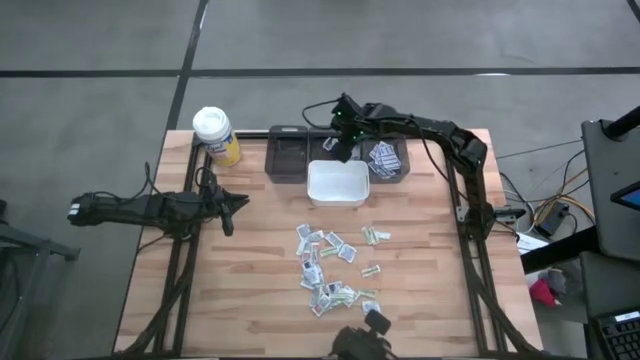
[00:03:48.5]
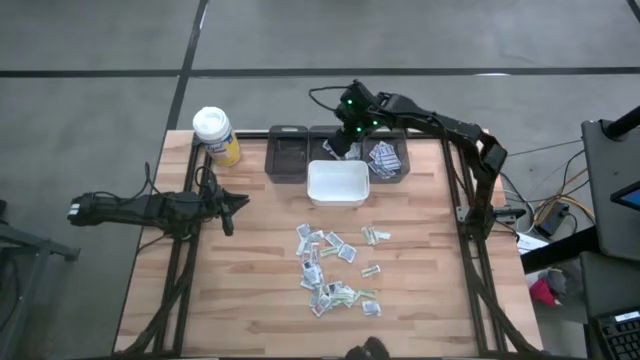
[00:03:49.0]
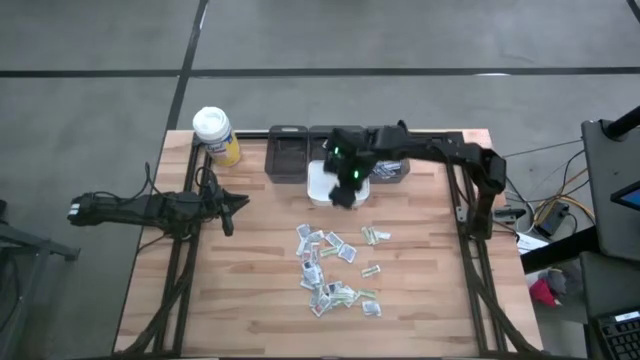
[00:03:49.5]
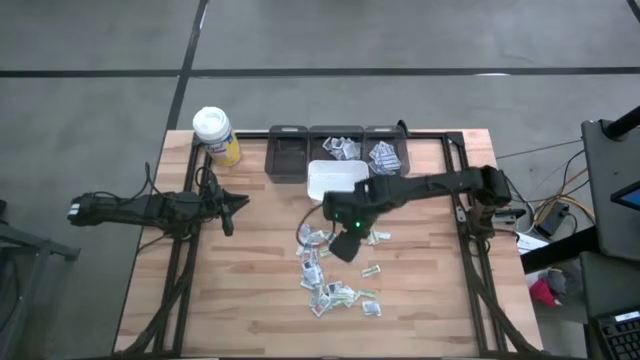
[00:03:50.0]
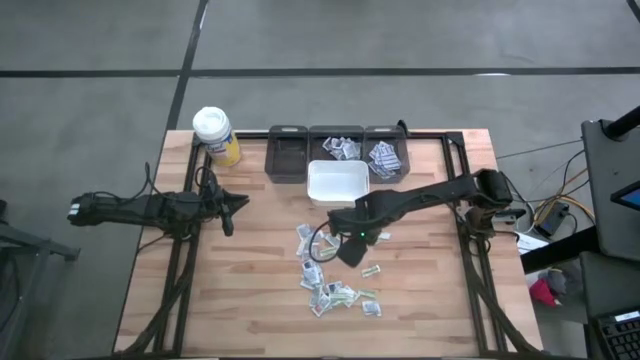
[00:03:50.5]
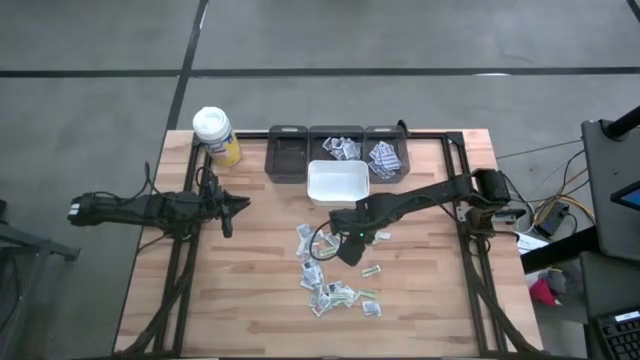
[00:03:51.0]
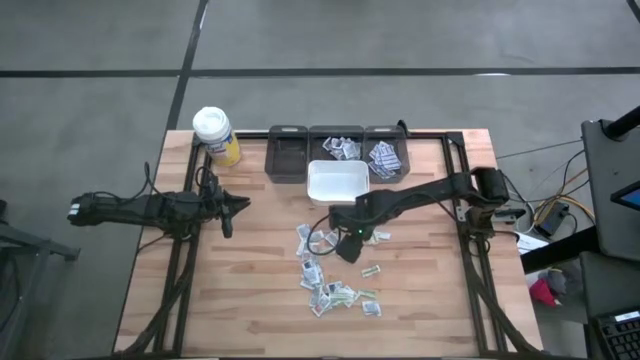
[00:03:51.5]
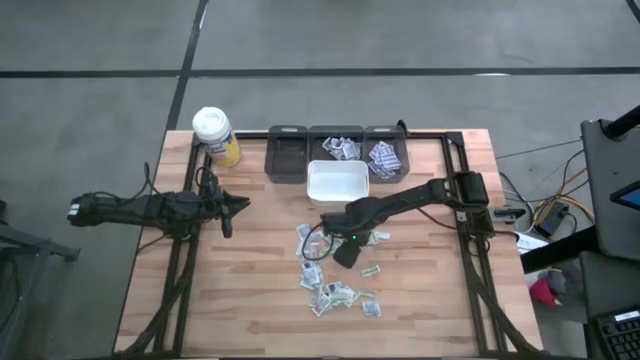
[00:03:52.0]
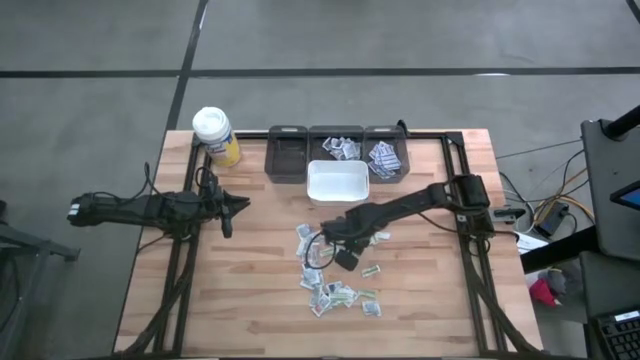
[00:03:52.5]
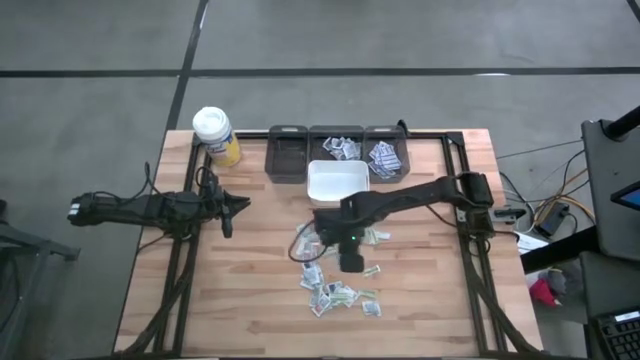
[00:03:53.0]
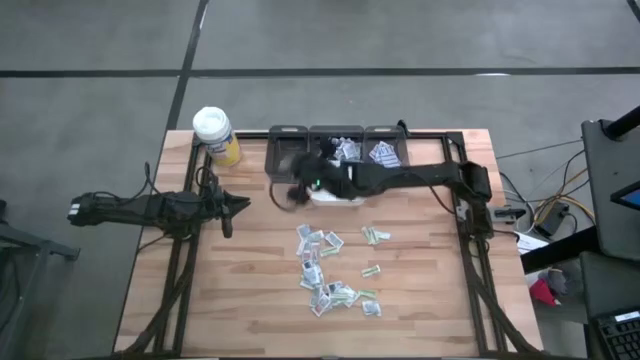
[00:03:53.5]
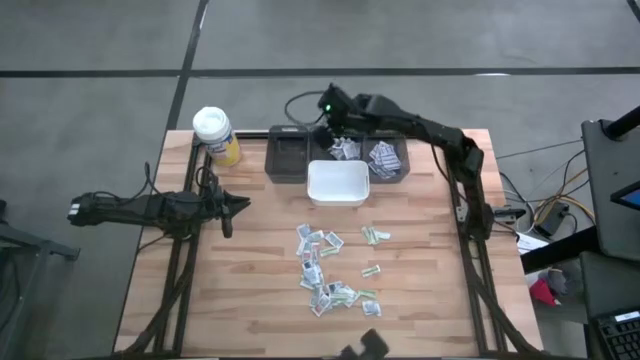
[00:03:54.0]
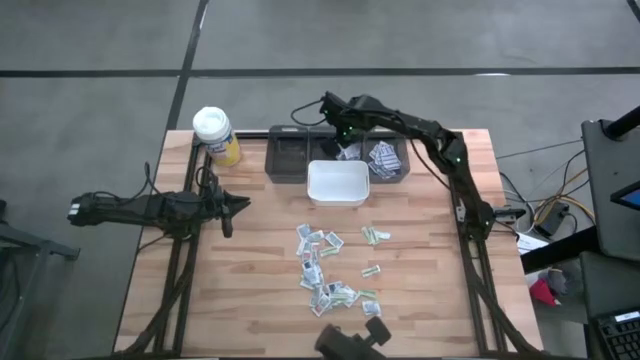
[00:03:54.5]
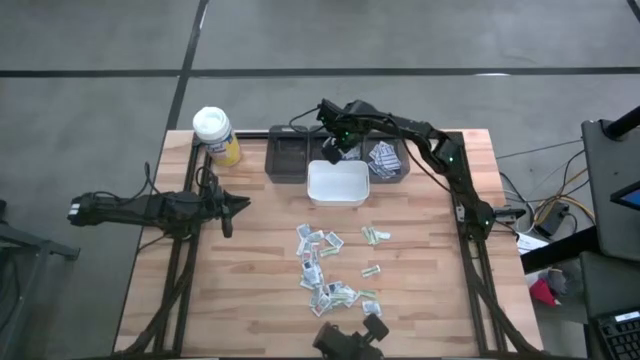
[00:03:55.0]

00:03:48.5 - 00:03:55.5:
Task: Pick & Place First Aid Supplies
Put the alcohol pad into the middle black bin

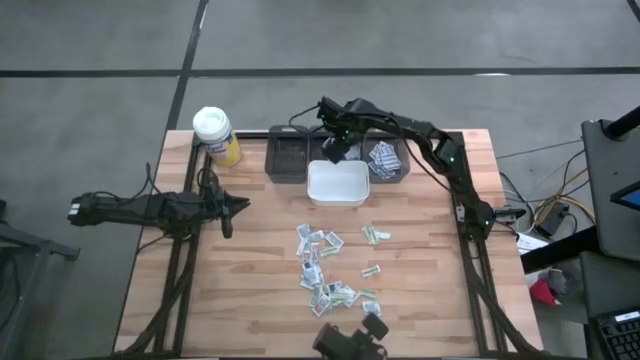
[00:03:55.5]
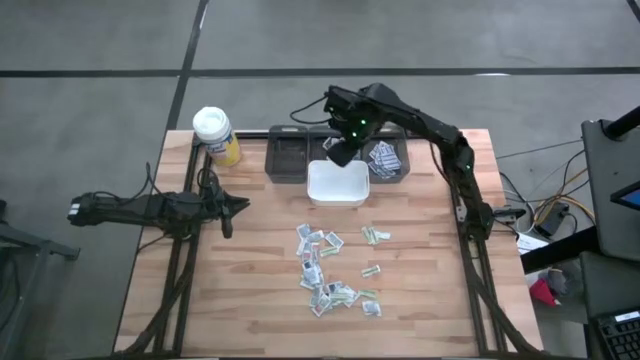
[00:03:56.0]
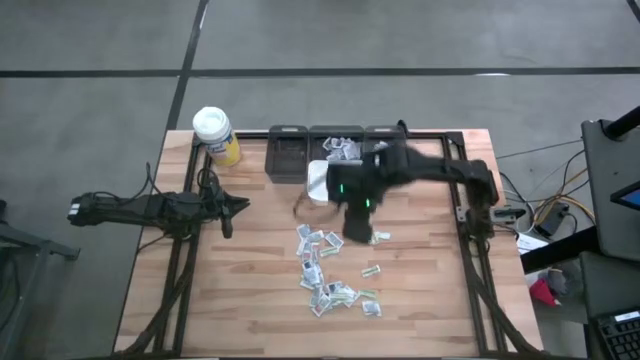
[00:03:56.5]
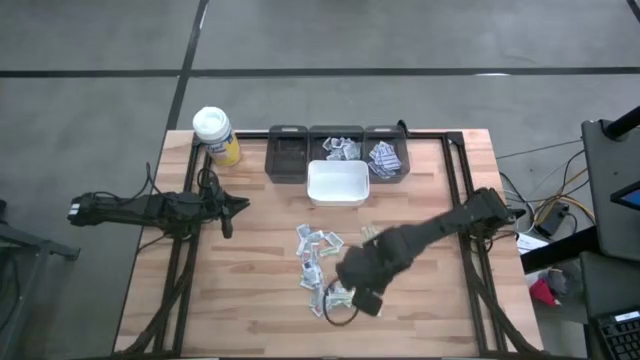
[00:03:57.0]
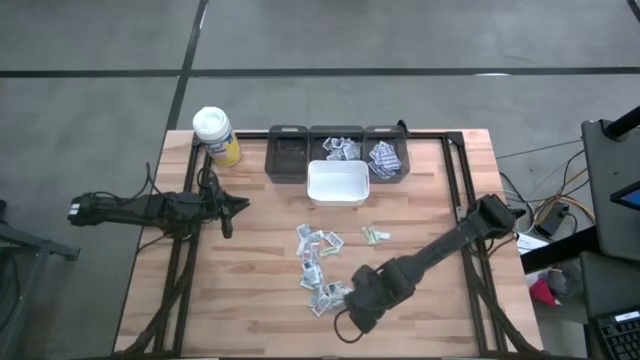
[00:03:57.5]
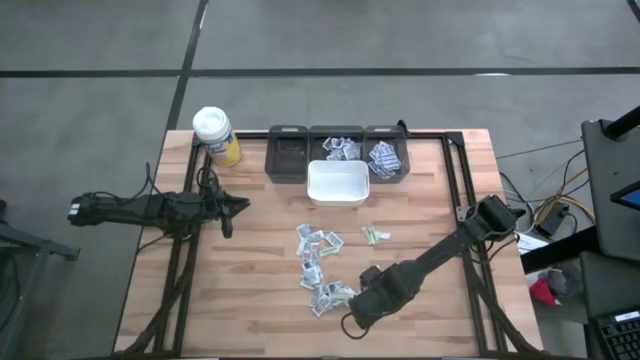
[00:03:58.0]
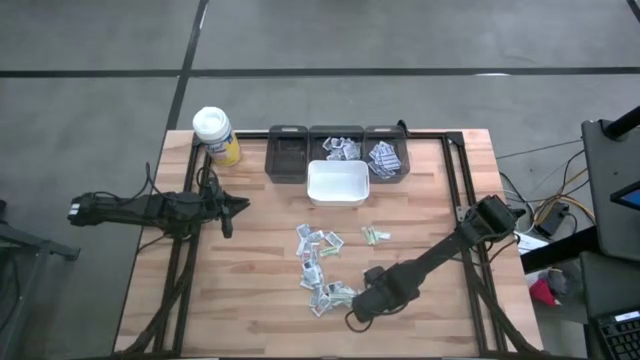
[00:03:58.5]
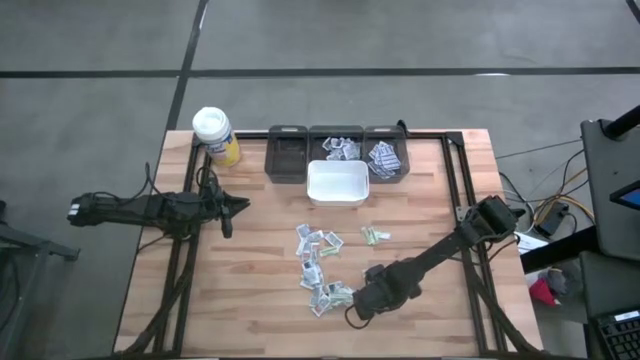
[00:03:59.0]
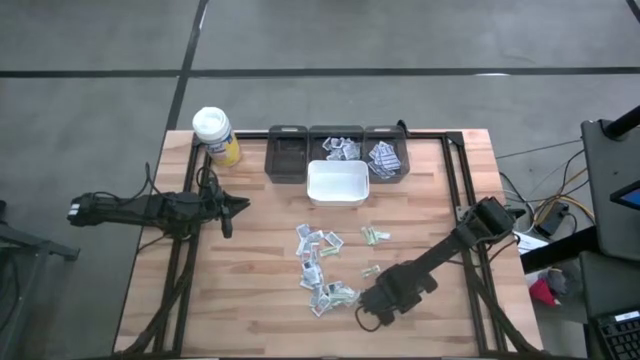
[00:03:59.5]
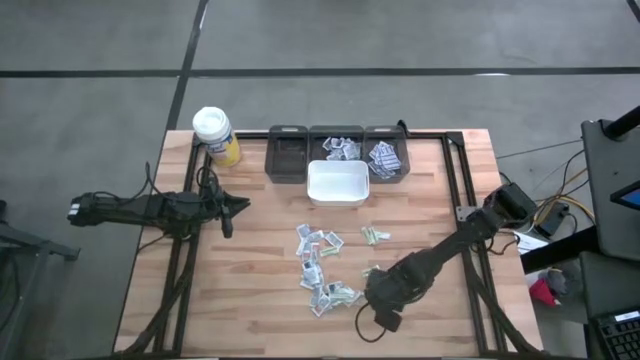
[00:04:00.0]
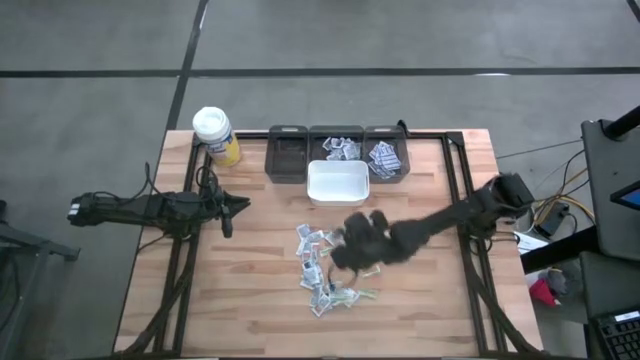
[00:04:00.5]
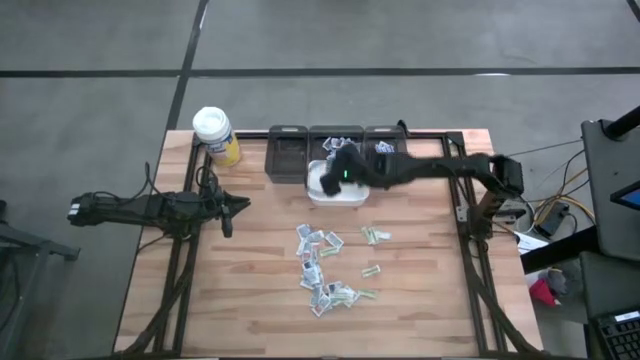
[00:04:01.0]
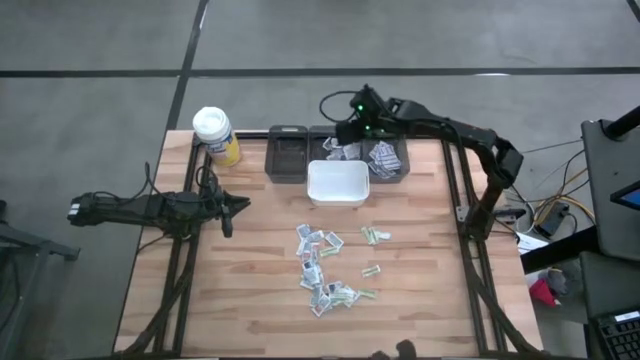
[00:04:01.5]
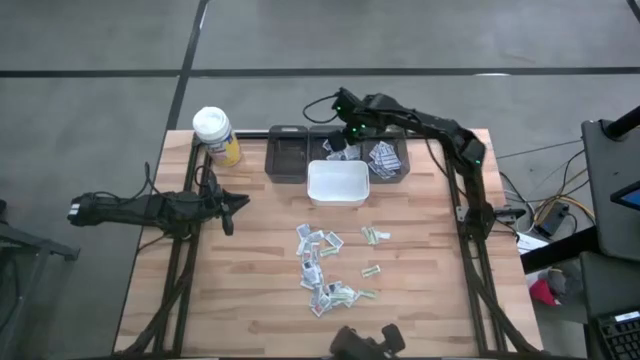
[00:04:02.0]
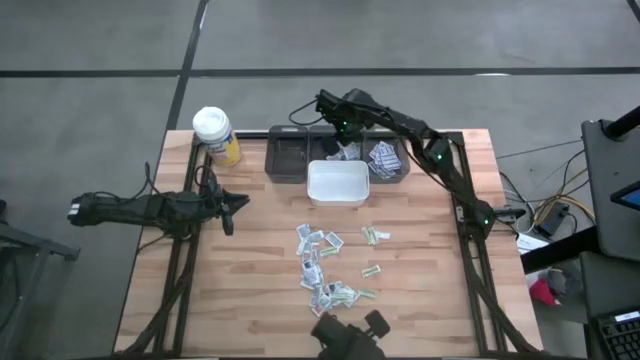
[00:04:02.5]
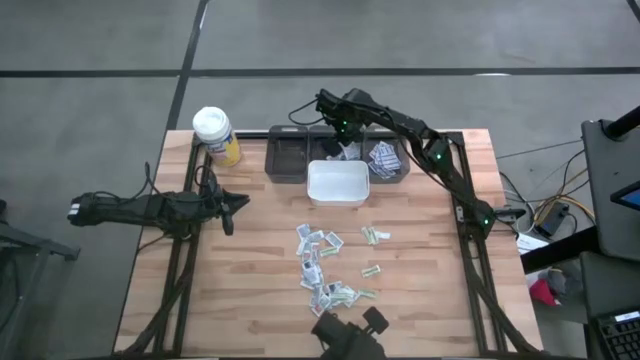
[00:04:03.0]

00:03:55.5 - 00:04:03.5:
Put the alcohol pad into the middle black bin

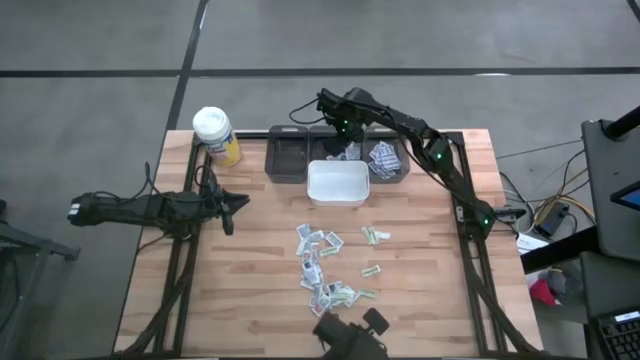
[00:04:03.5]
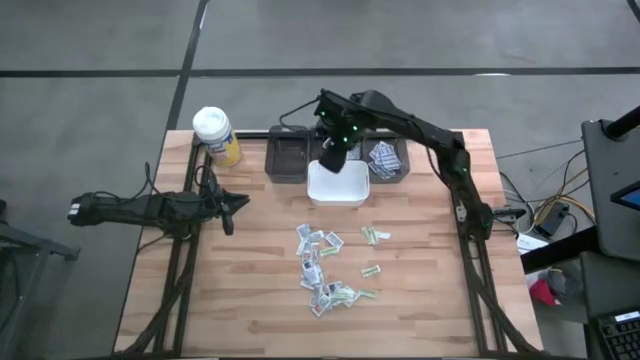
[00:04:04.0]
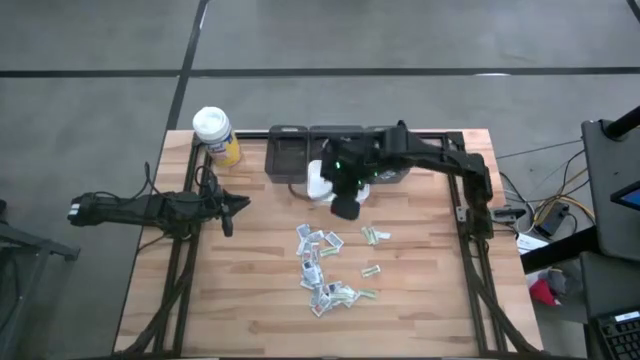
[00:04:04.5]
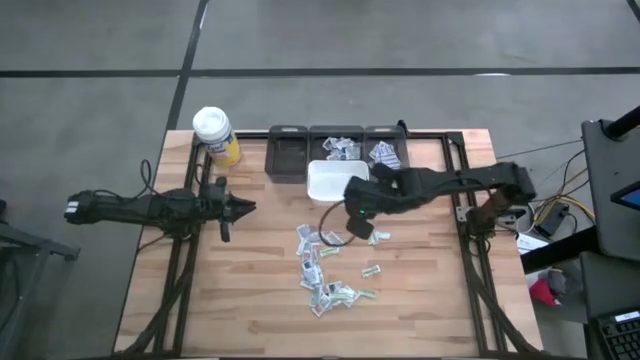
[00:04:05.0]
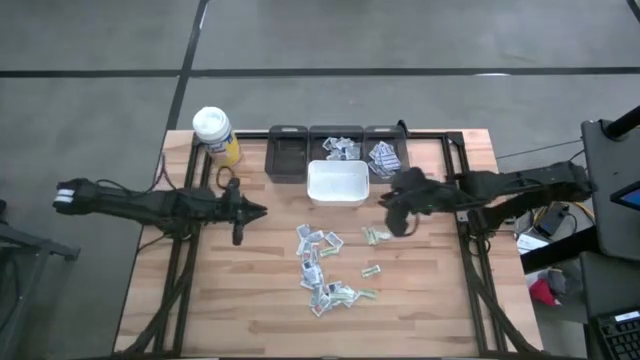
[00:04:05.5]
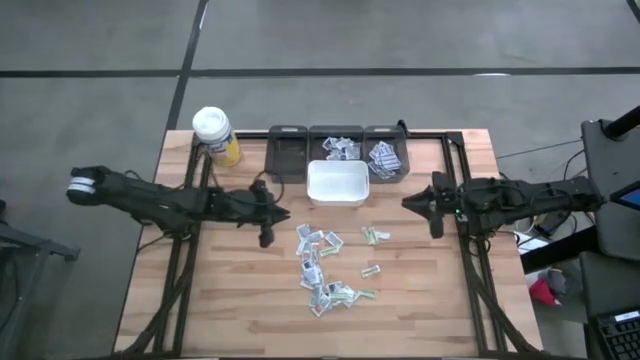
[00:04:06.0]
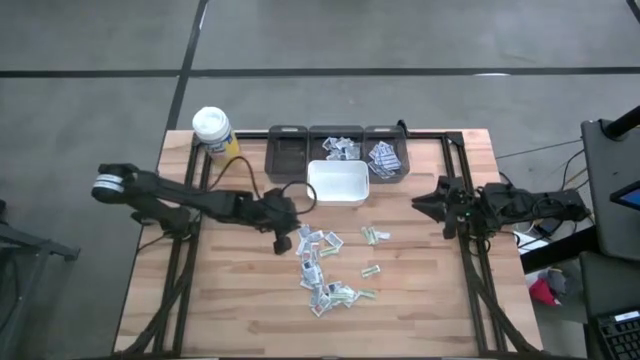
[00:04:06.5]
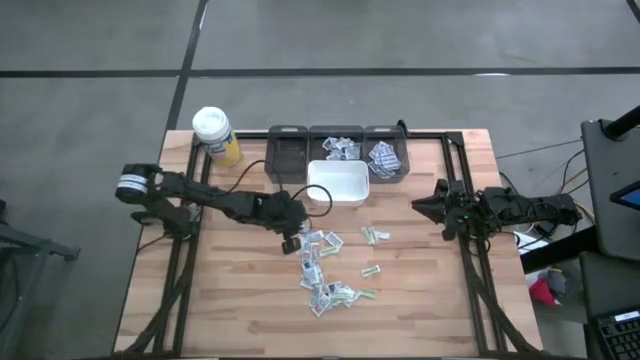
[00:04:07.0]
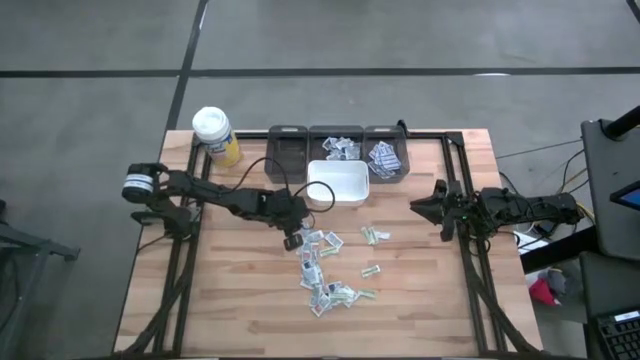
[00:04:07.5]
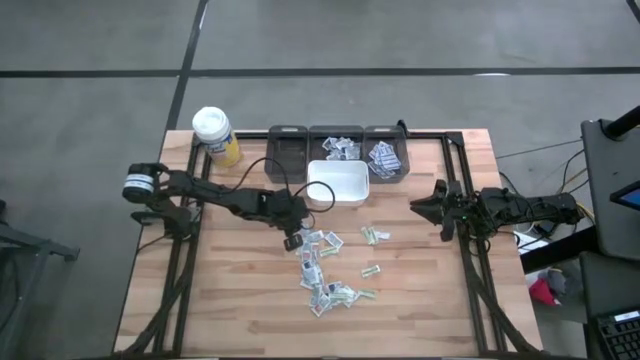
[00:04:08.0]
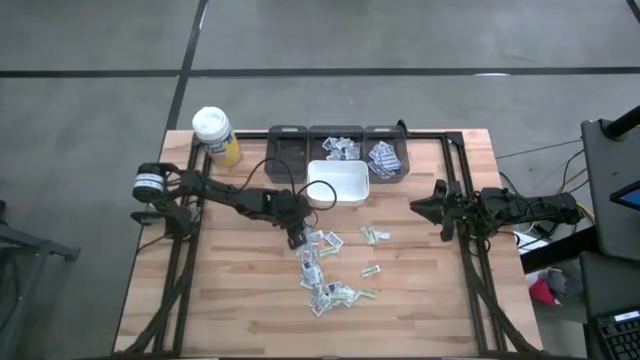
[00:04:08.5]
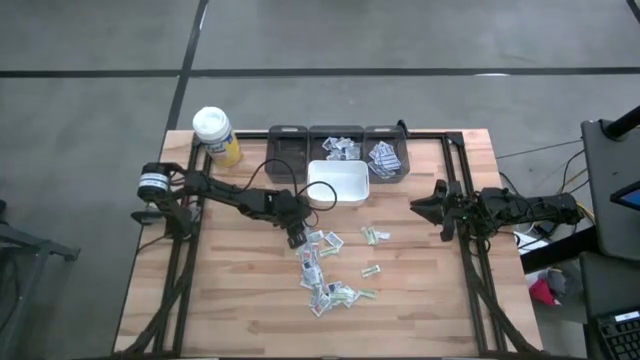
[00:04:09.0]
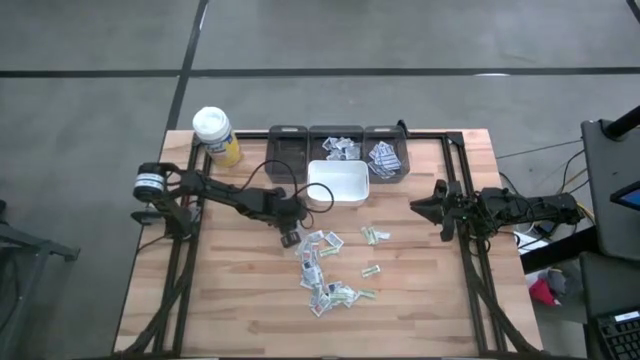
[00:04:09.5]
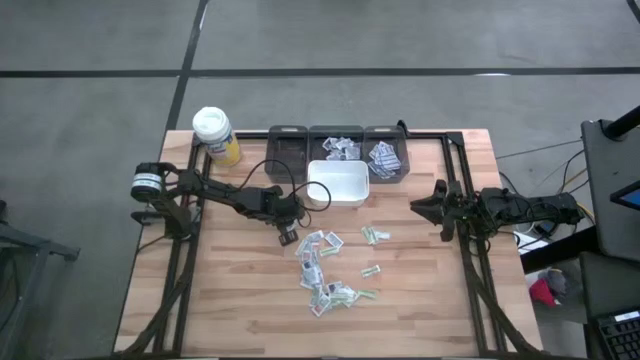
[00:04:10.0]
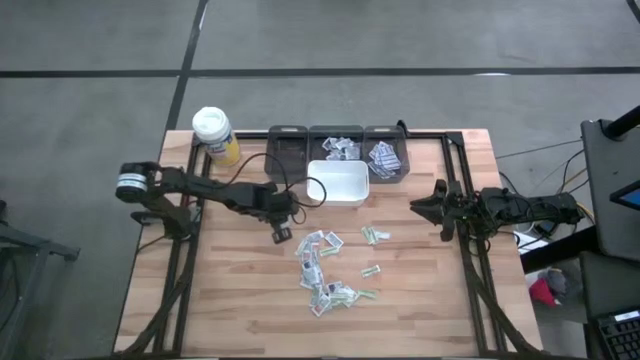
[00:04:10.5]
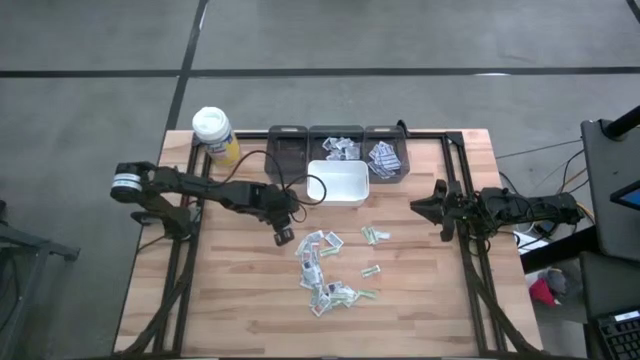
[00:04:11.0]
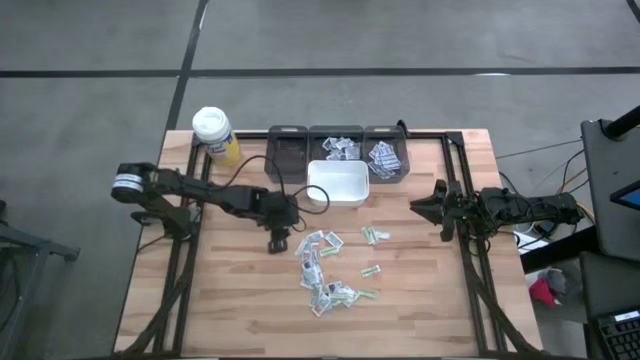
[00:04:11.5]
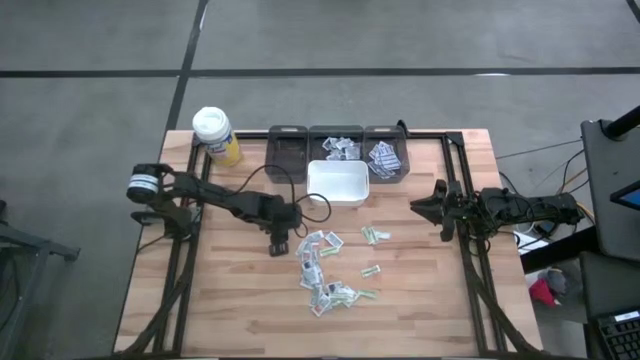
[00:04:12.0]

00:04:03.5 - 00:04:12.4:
Put the alcohol pad into the middle black bin
